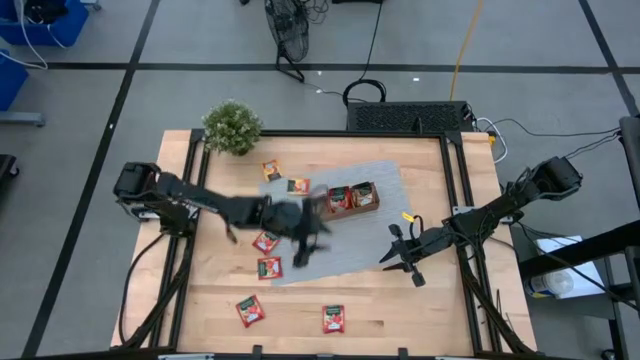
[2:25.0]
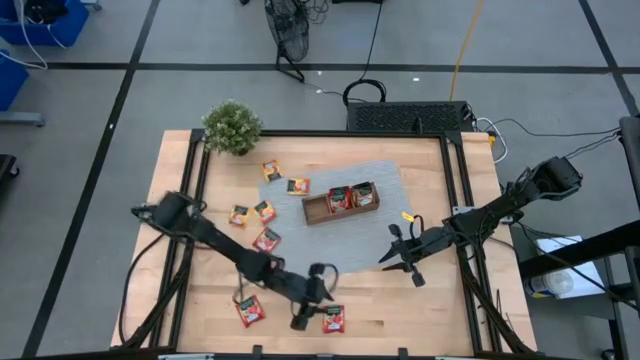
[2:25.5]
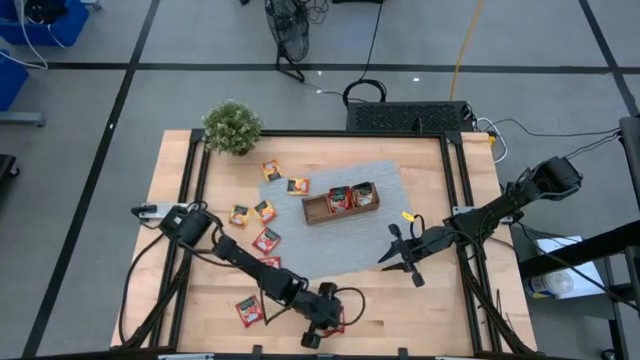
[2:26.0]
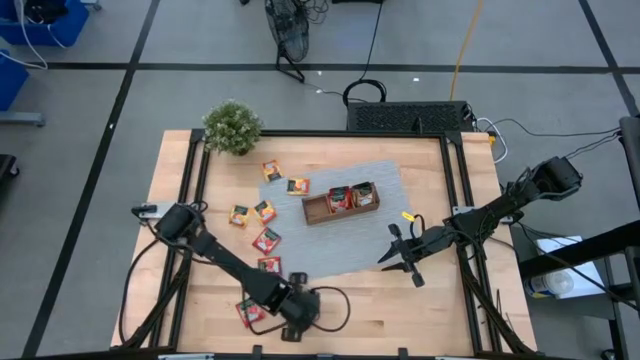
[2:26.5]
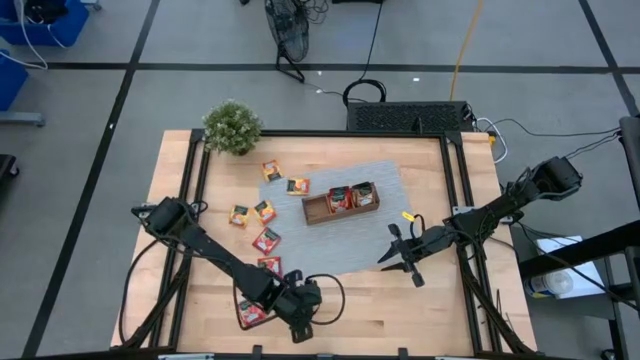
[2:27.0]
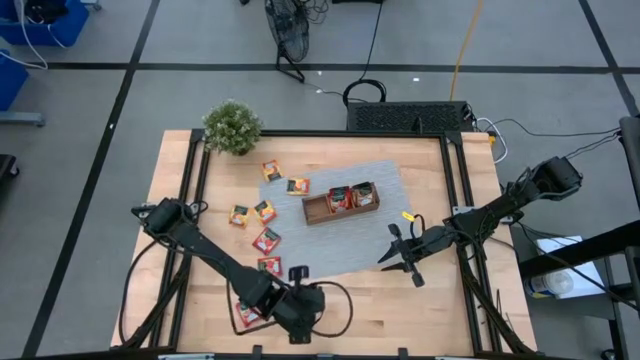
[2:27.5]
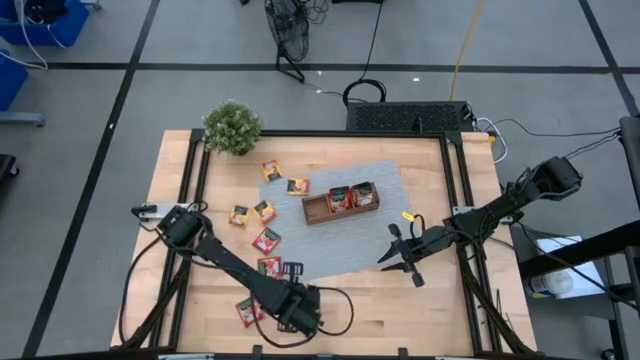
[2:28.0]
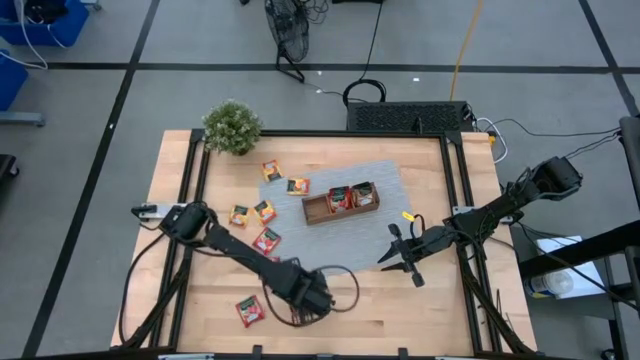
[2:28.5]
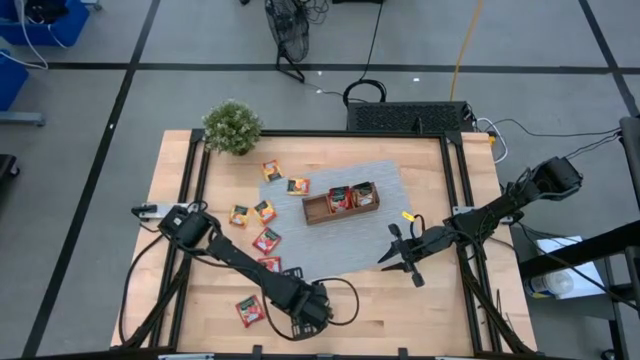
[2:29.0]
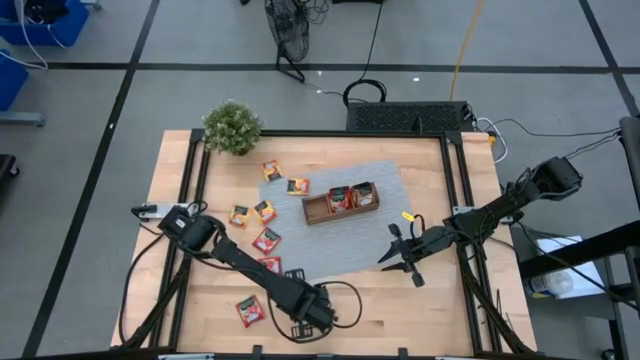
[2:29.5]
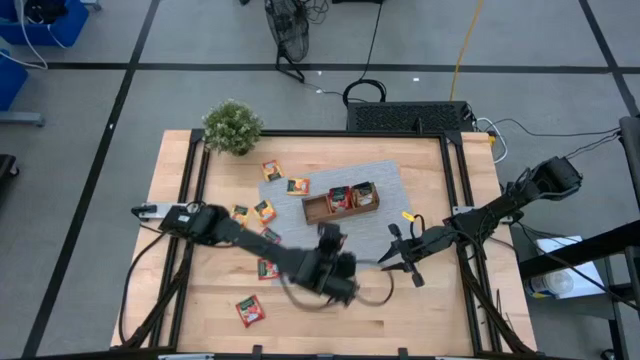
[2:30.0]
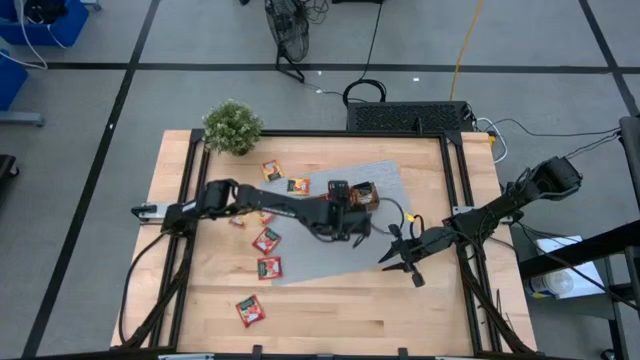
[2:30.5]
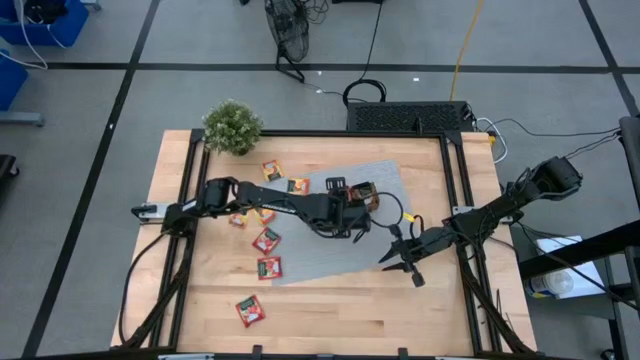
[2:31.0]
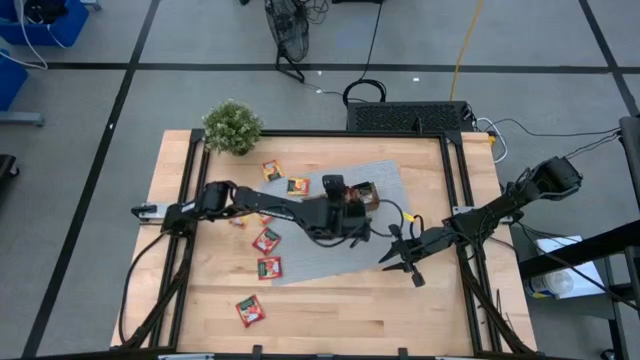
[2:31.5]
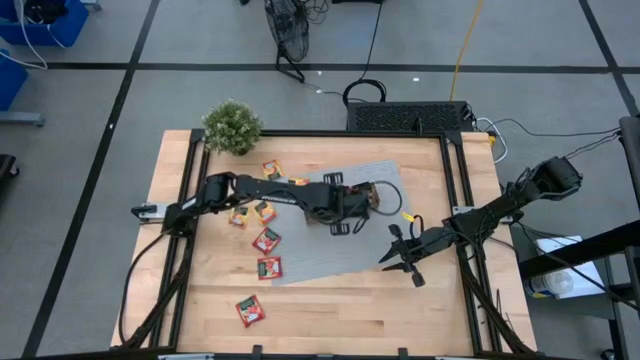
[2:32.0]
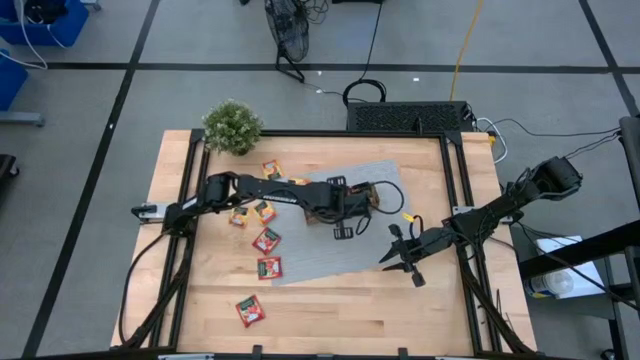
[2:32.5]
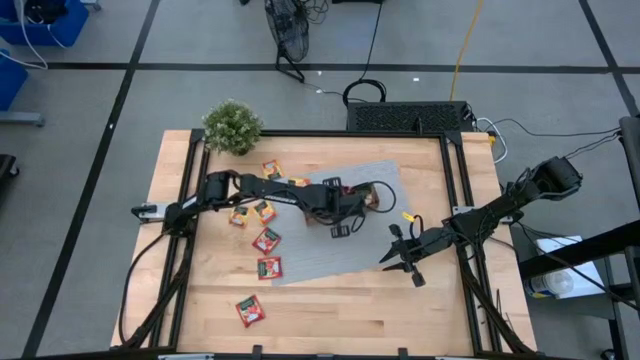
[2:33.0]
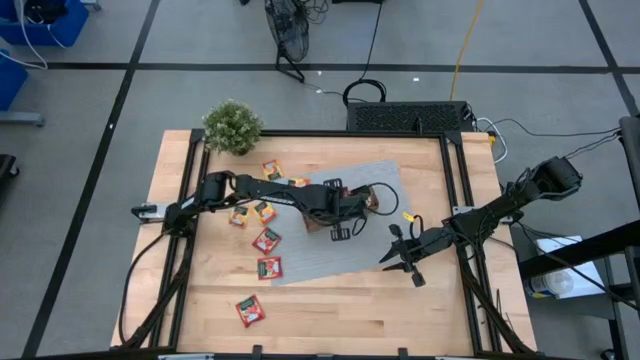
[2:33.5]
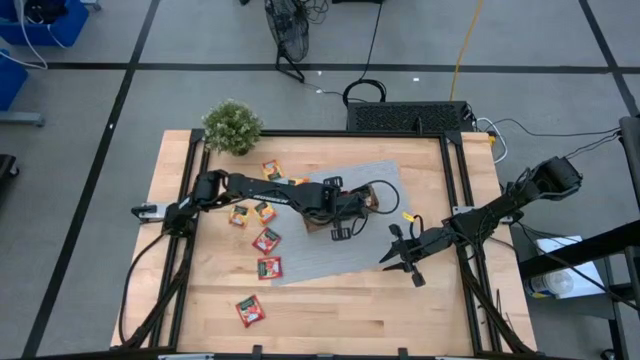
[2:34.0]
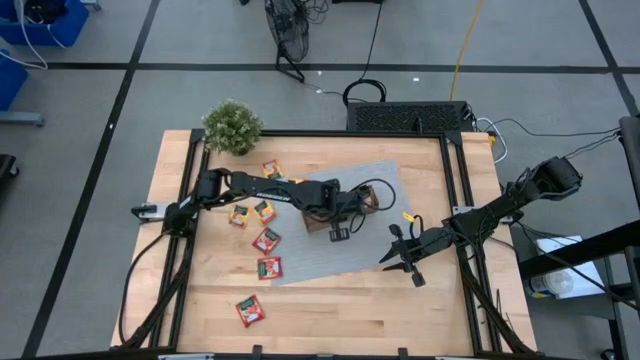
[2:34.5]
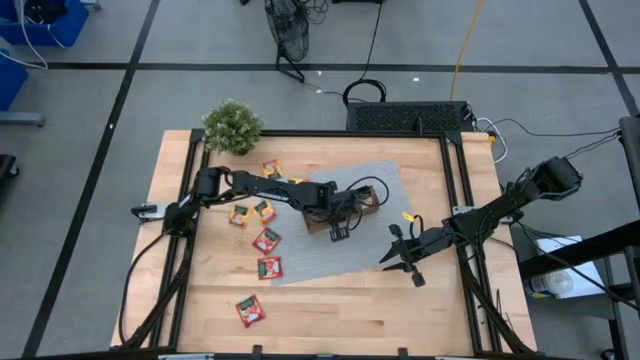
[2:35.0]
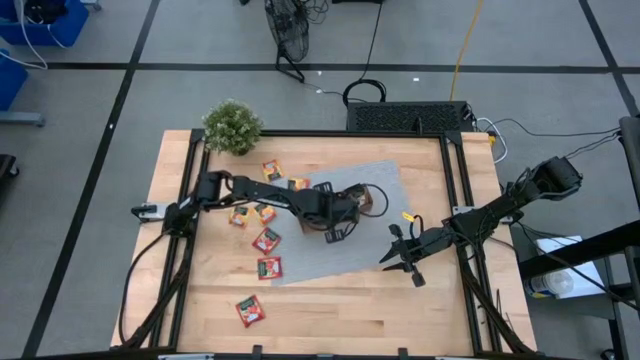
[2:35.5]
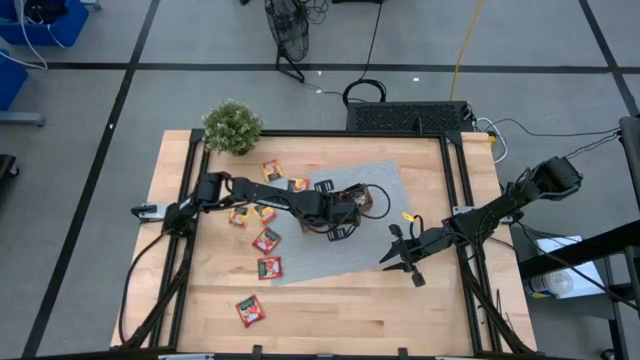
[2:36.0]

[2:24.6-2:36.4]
Task: Pick & Place Tea
Put the red tea bag into the middle section of the wooden organizer

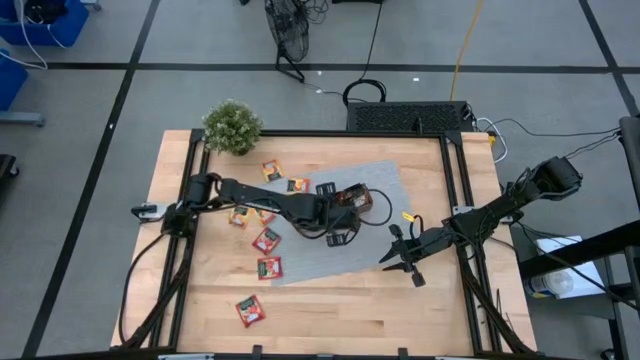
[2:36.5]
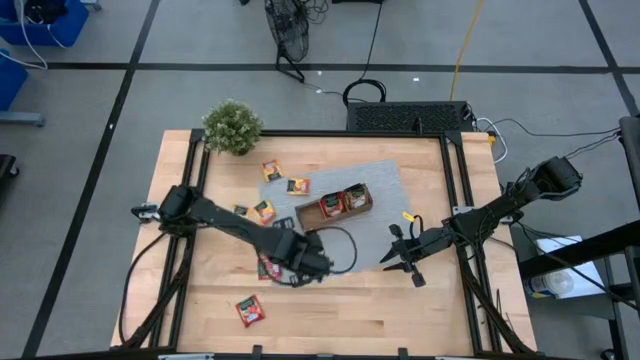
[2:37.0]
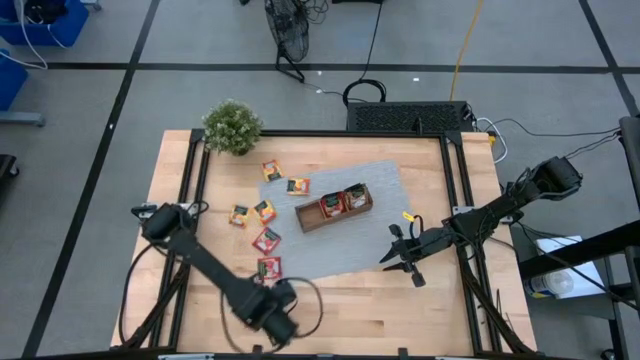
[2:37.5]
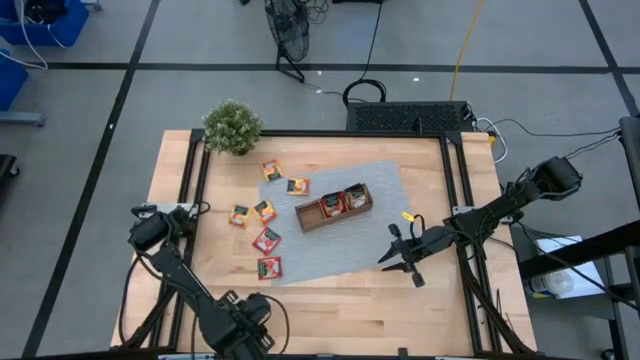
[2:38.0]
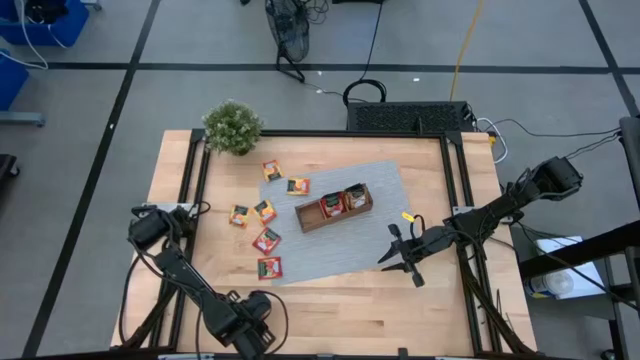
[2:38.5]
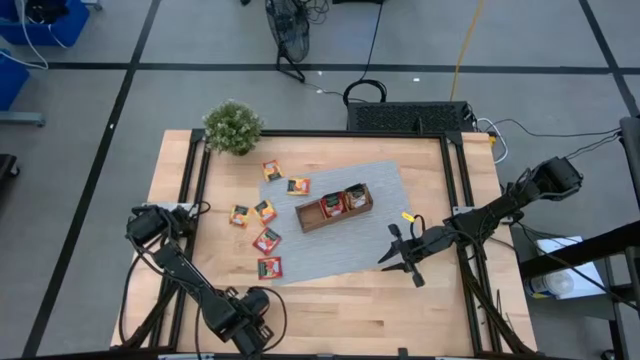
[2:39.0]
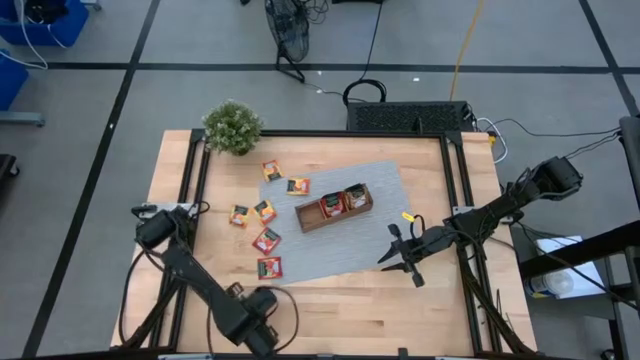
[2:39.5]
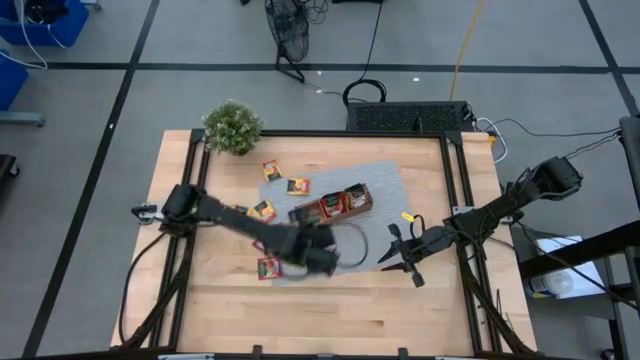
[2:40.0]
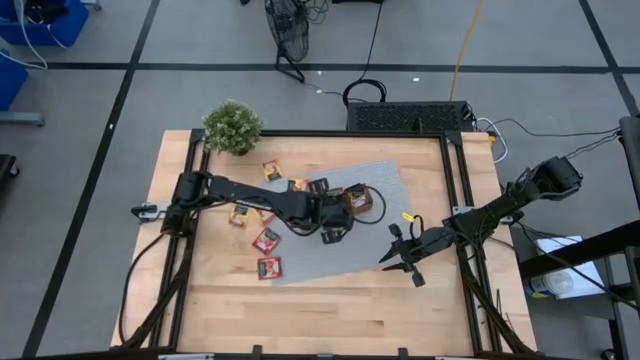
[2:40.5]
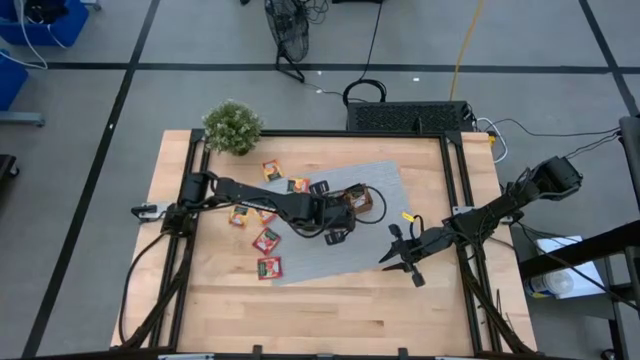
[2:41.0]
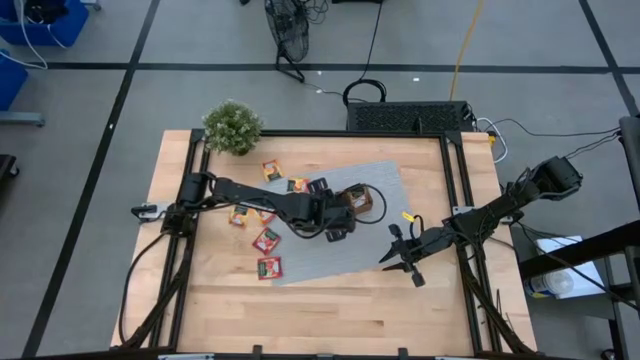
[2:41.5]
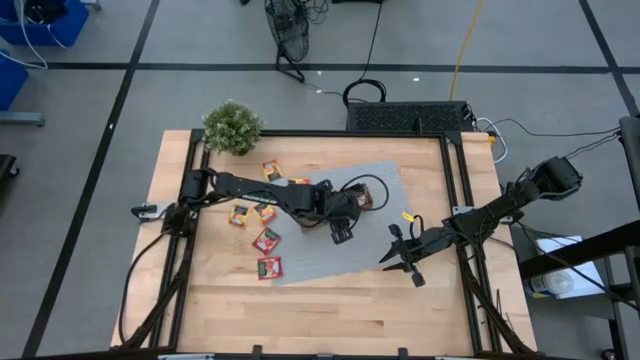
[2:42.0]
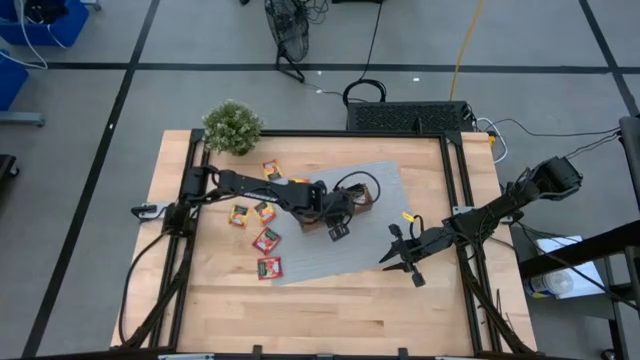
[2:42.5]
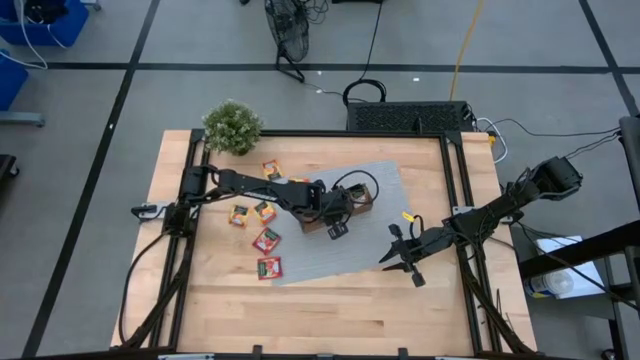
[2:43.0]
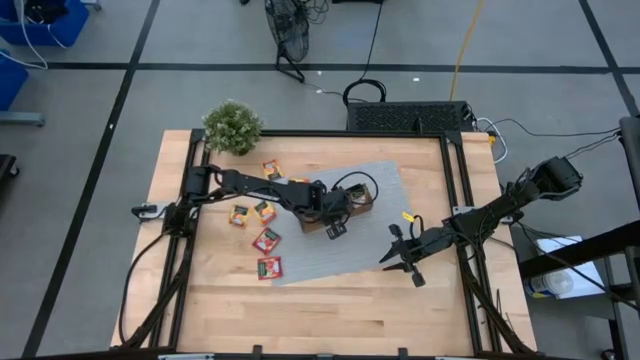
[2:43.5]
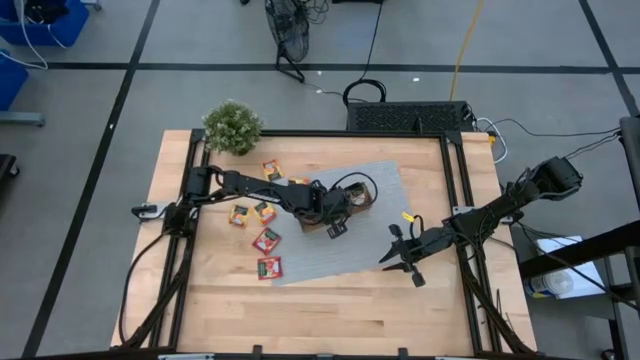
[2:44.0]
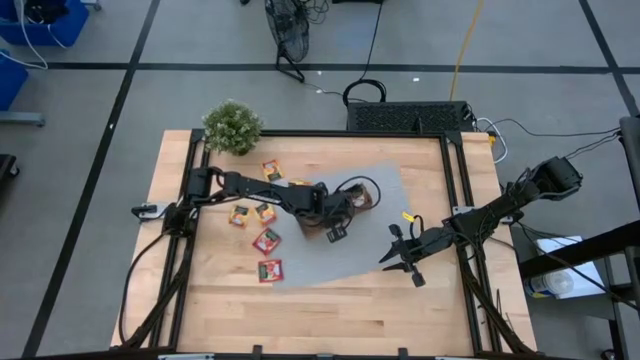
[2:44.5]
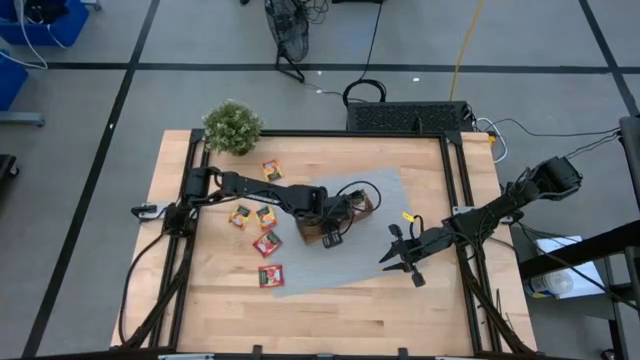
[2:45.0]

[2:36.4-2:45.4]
Put the red tea bag into the middle section of the wooden organizer

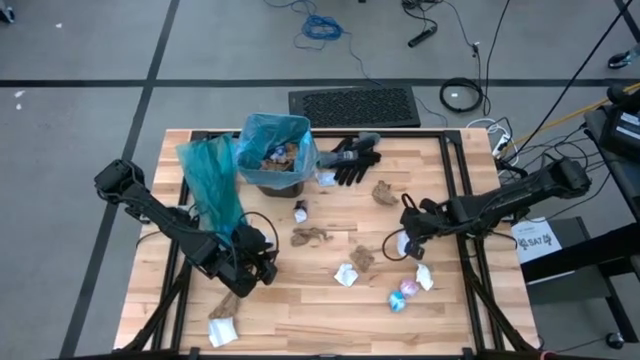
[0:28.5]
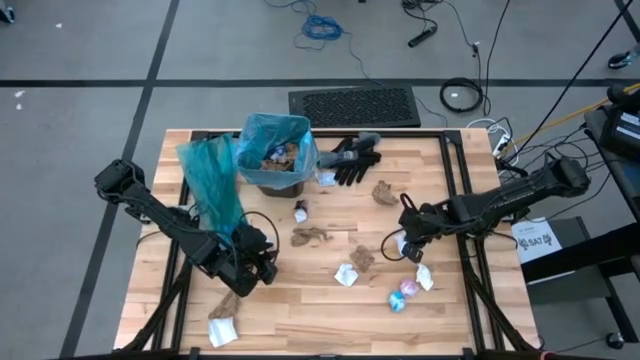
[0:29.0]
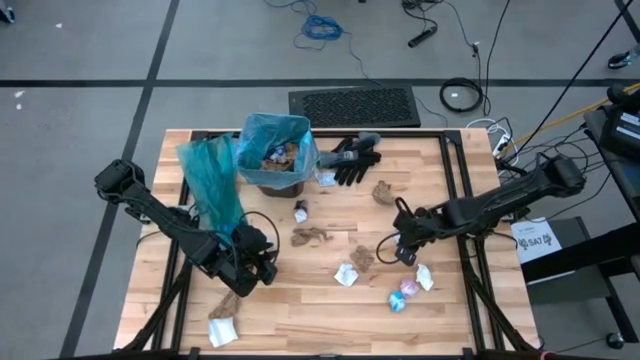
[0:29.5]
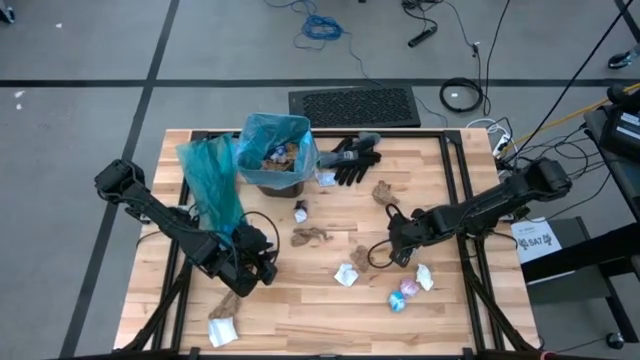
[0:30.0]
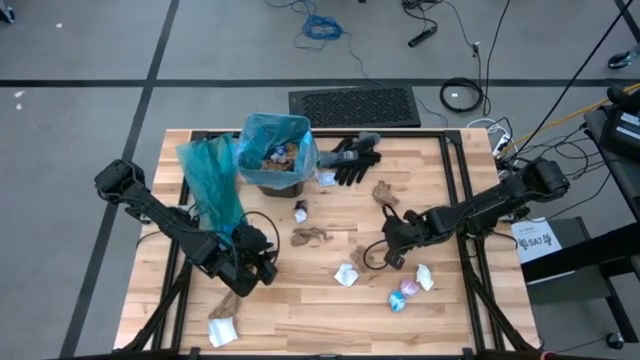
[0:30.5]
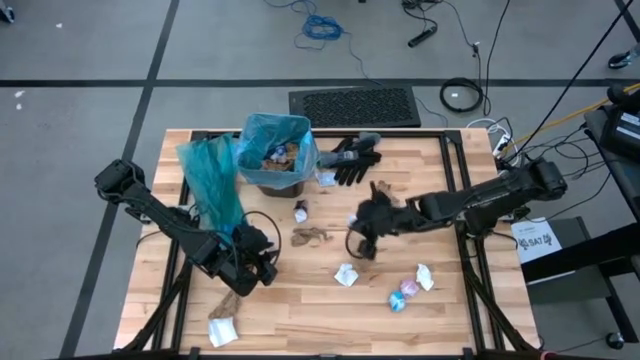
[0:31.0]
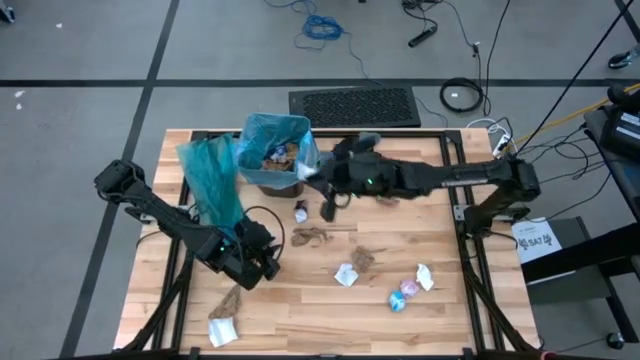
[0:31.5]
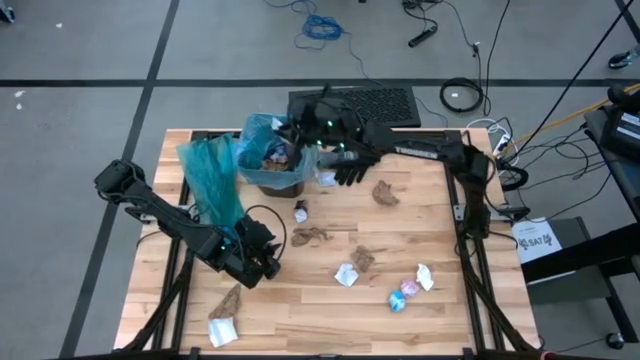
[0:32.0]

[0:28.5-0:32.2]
Task: place trash/remove bag and relplace
Put the white cardboard into the trash bin
